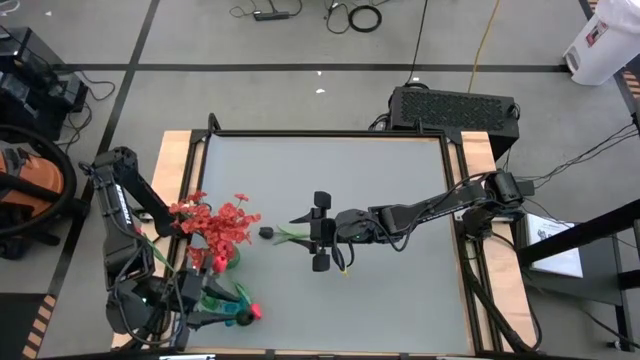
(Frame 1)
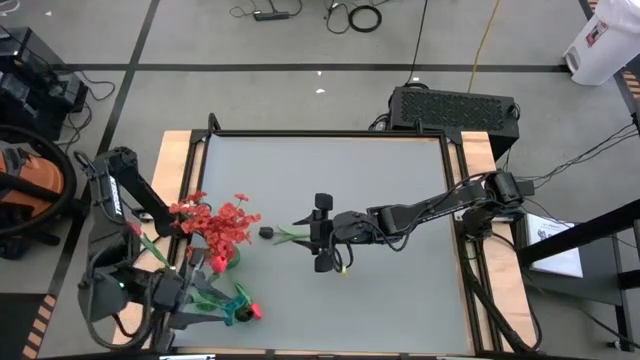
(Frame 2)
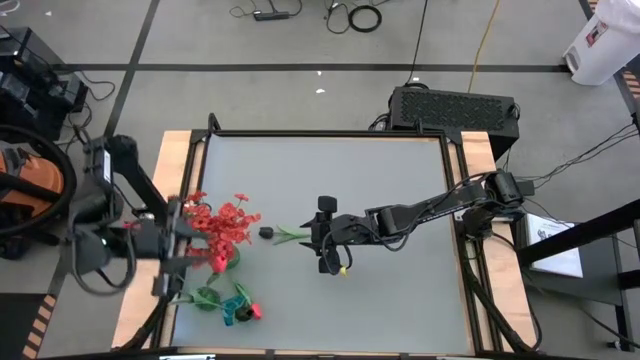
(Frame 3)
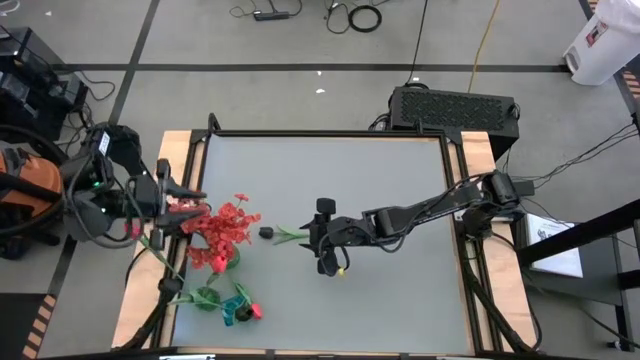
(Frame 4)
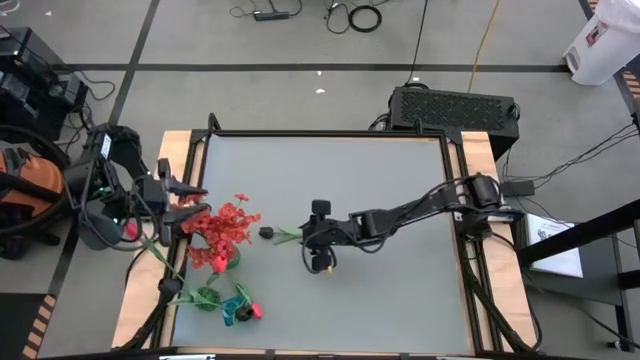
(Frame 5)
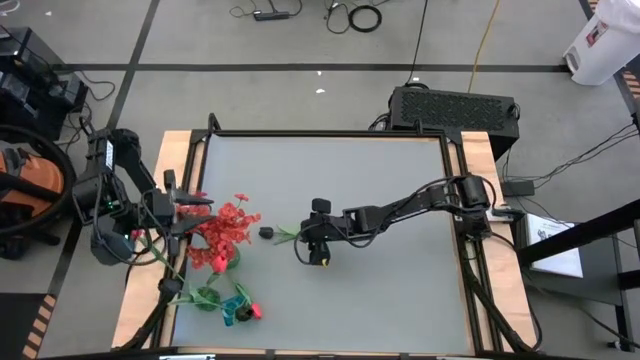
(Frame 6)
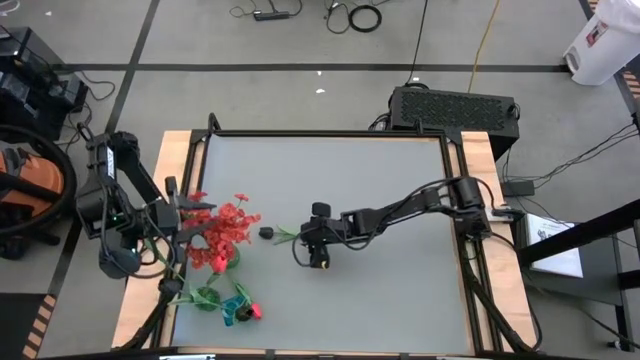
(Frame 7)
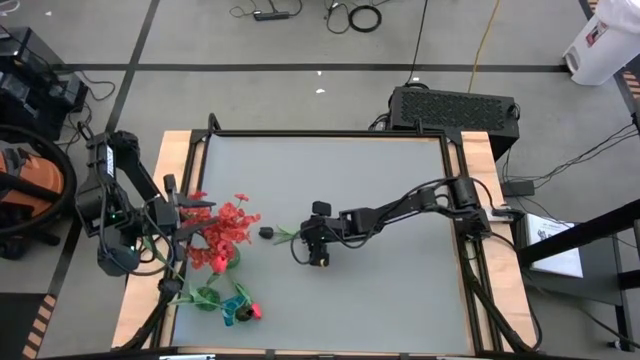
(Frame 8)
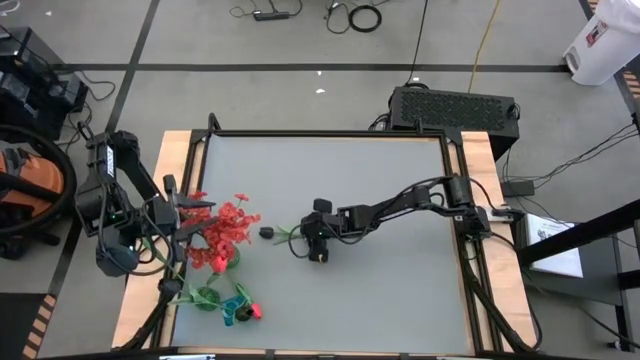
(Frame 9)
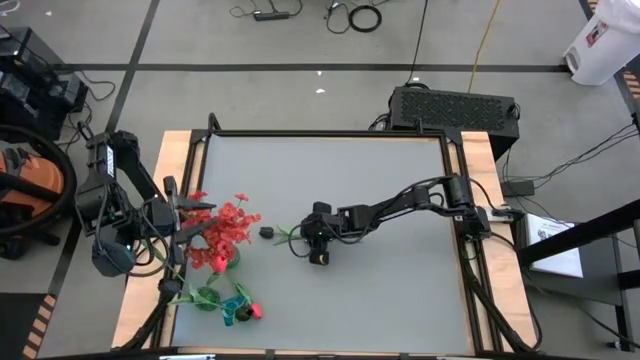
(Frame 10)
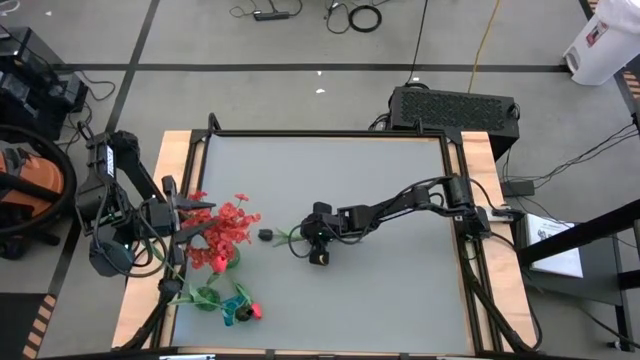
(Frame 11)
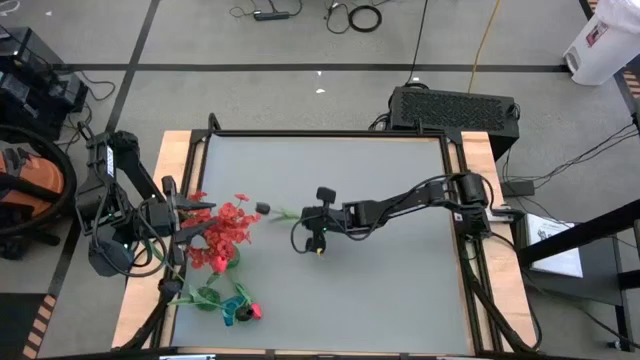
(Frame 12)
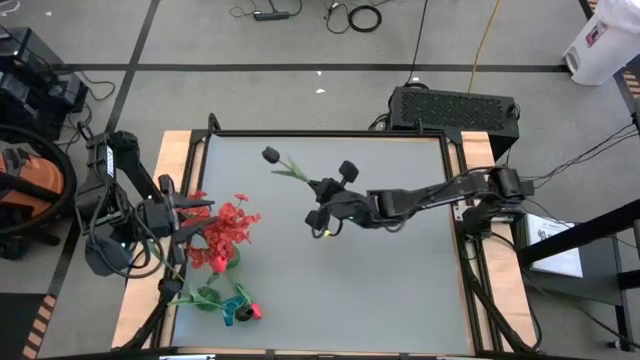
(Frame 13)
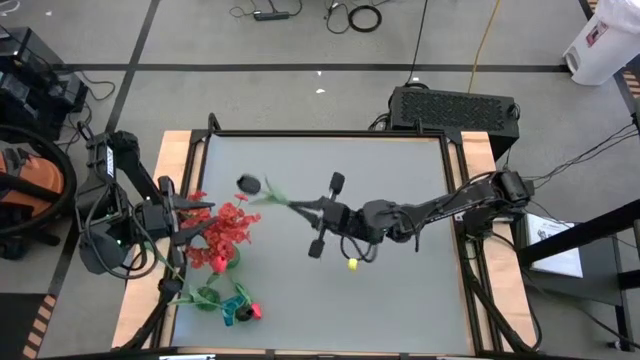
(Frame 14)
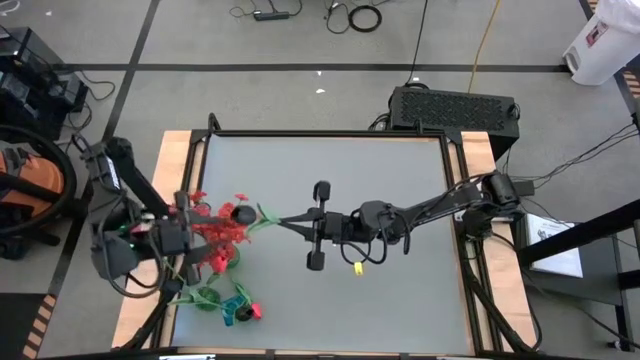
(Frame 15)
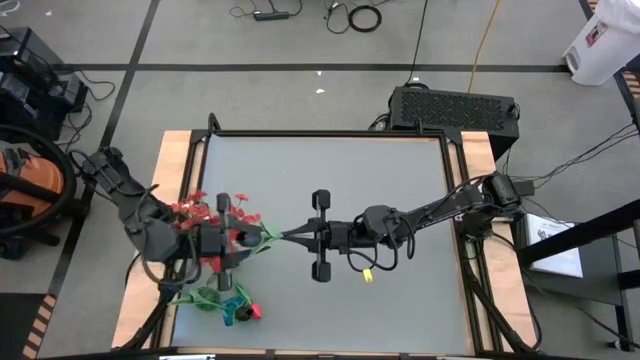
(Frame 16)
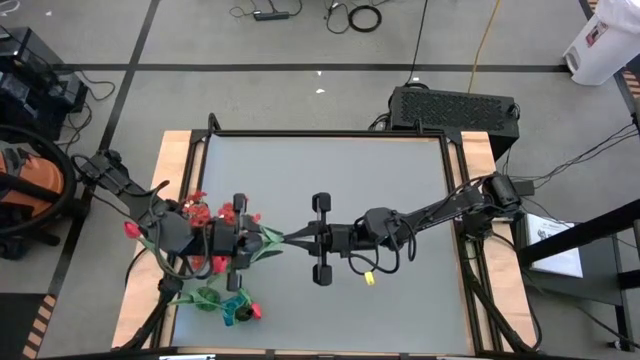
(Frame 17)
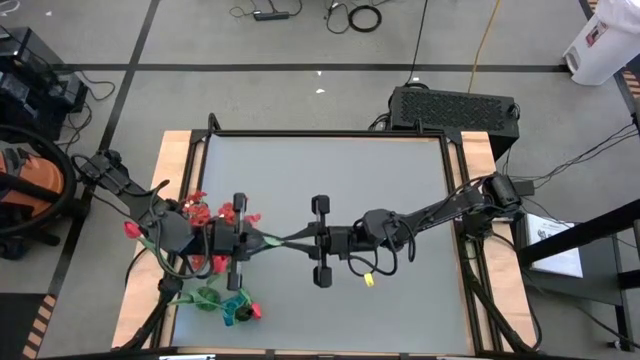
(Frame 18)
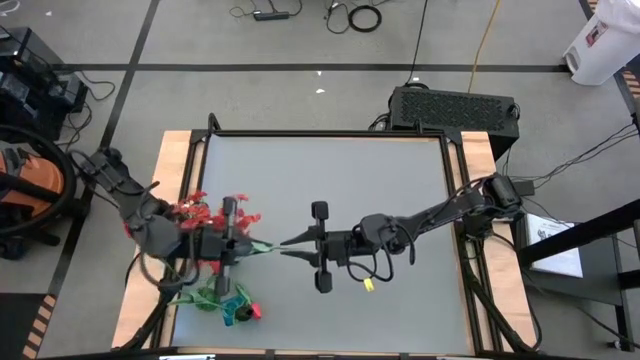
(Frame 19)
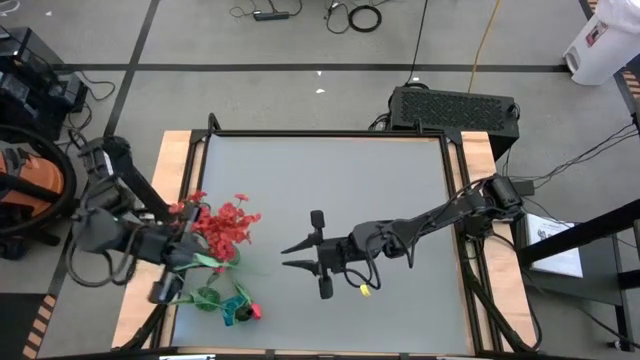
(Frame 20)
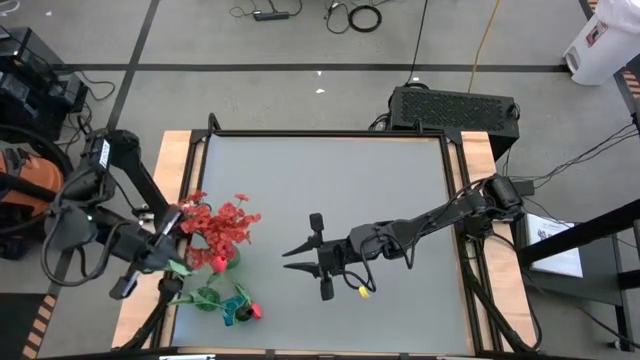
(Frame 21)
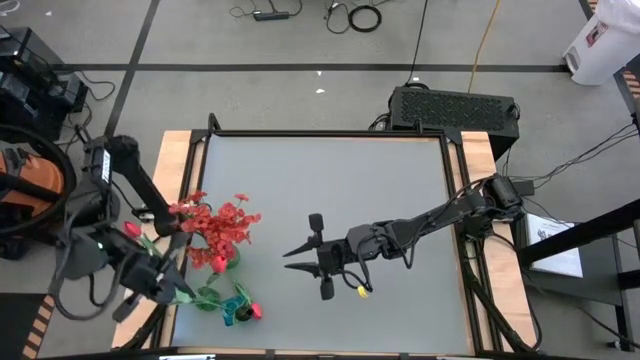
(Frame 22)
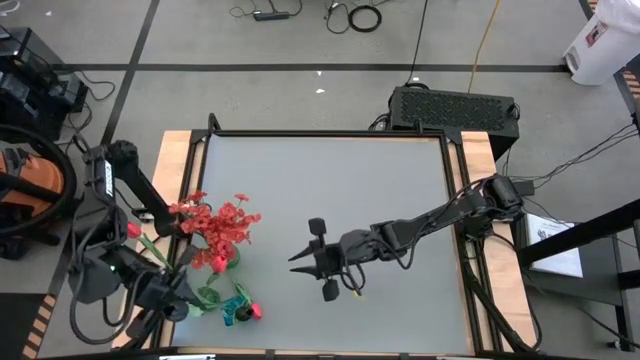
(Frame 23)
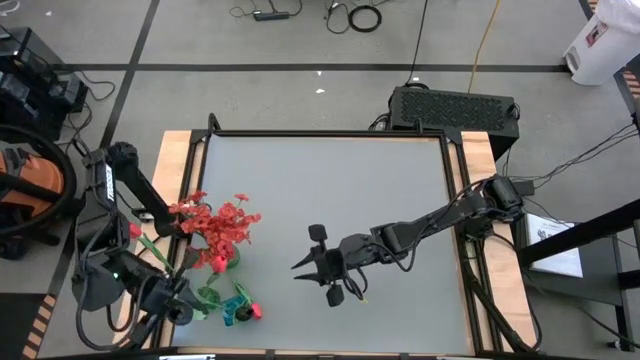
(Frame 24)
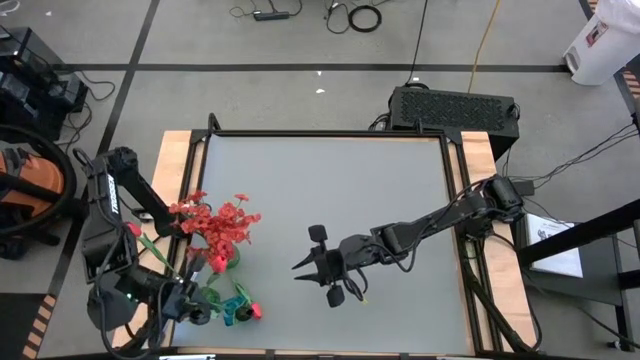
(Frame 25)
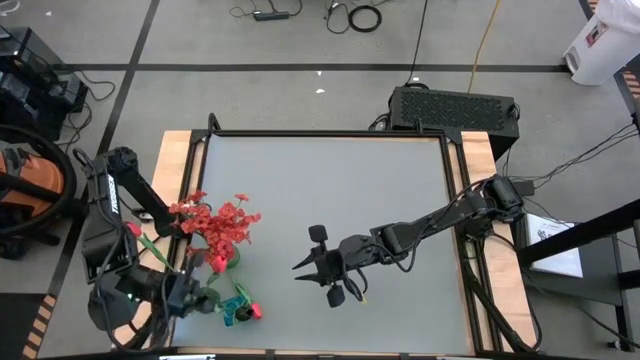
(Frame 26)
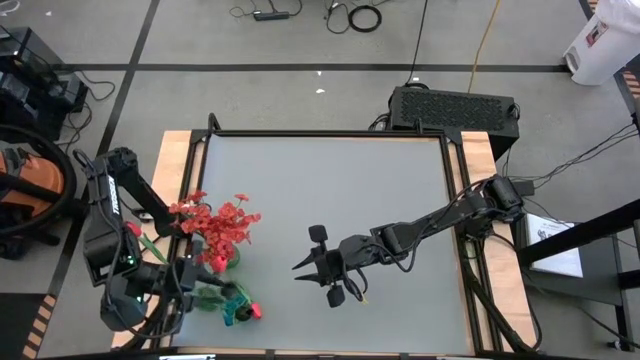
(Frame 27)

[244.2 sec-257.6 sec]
Task: Sort flowers into vase by color
Put the black flower into the blue vase

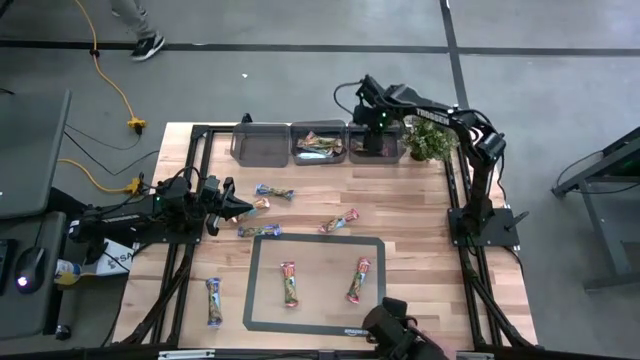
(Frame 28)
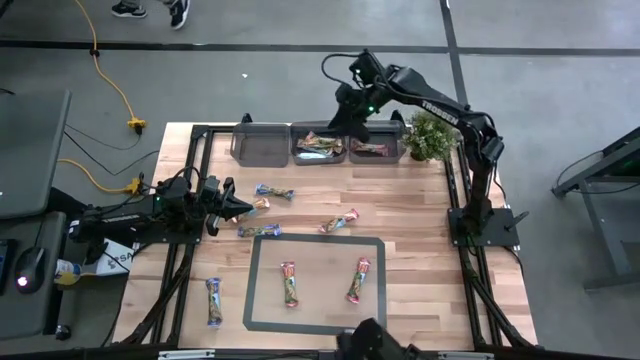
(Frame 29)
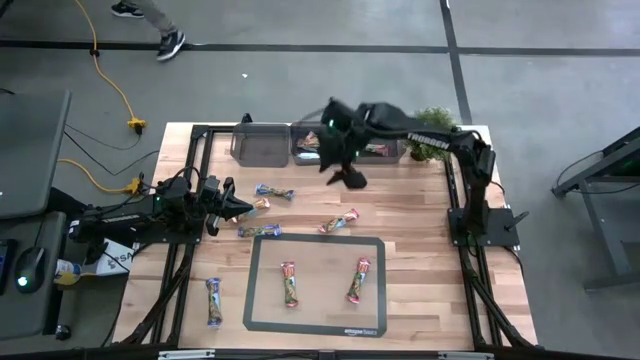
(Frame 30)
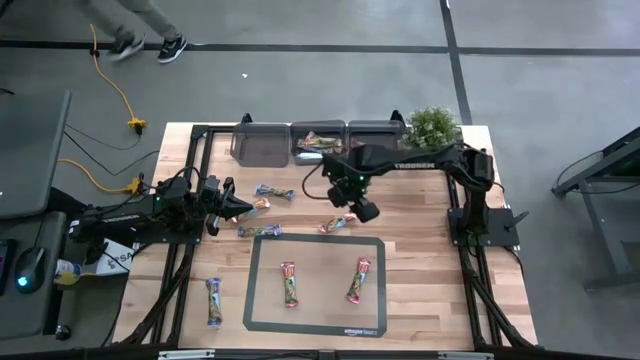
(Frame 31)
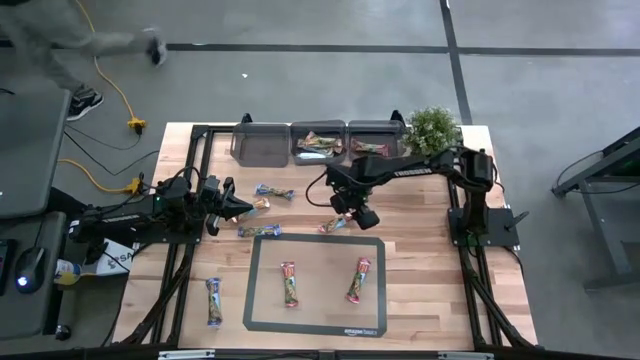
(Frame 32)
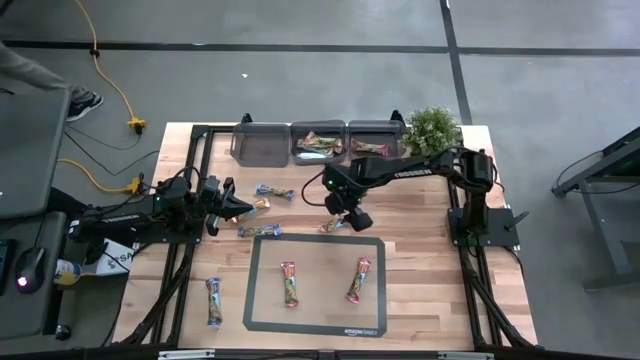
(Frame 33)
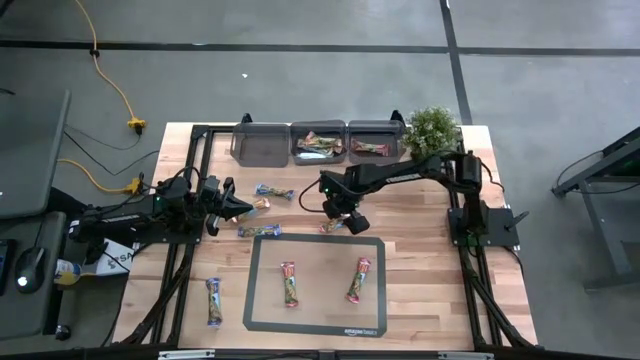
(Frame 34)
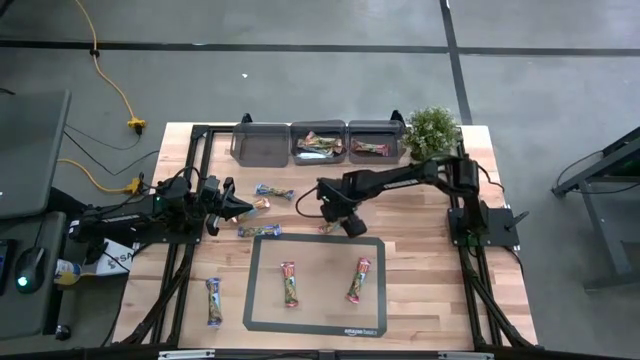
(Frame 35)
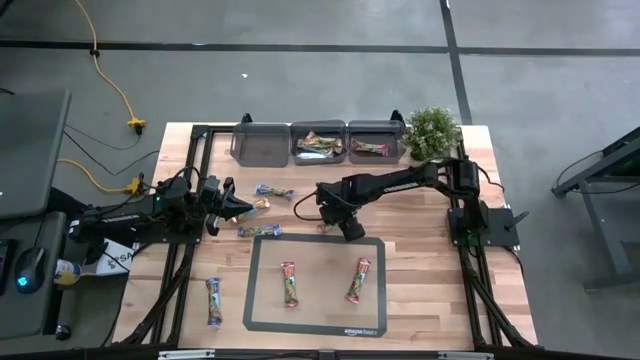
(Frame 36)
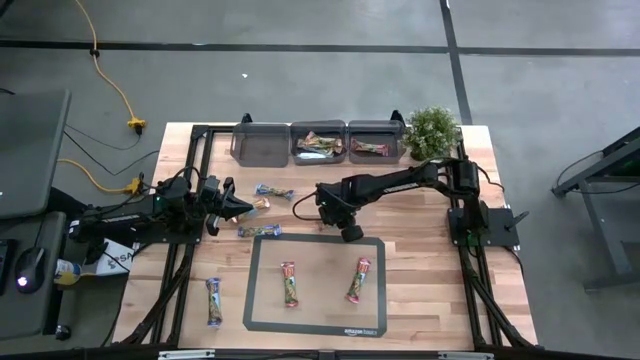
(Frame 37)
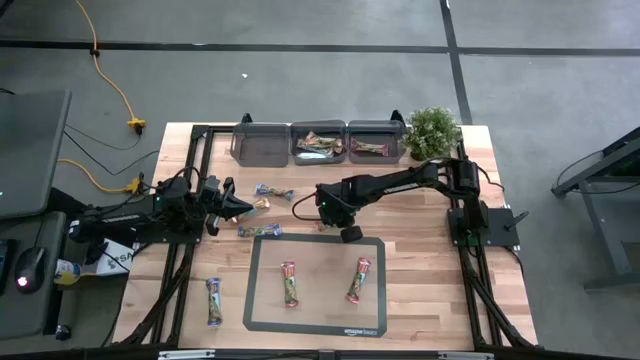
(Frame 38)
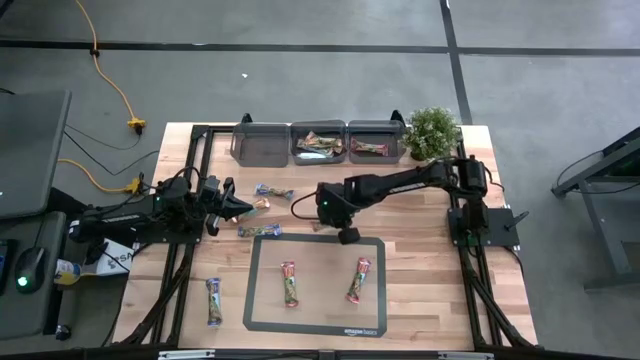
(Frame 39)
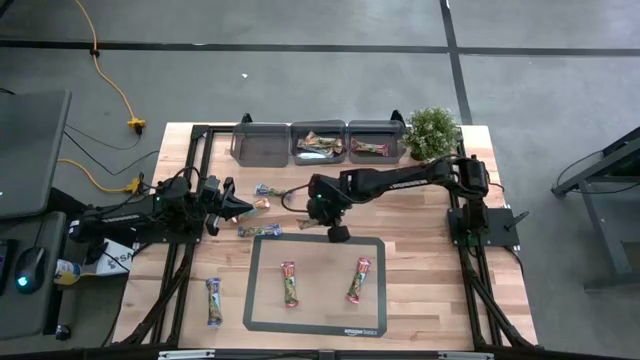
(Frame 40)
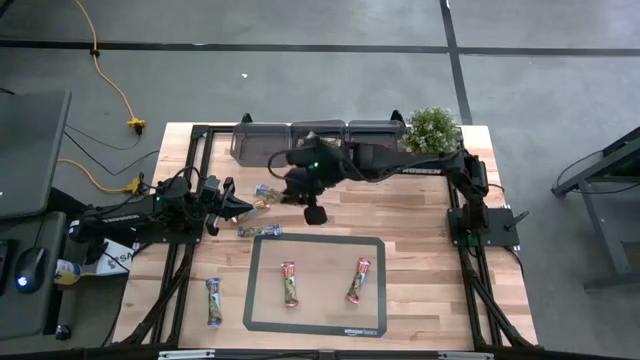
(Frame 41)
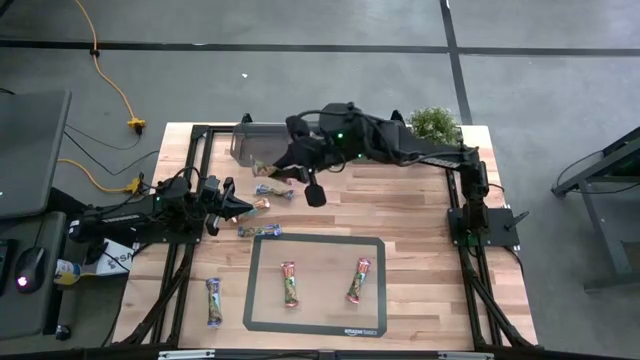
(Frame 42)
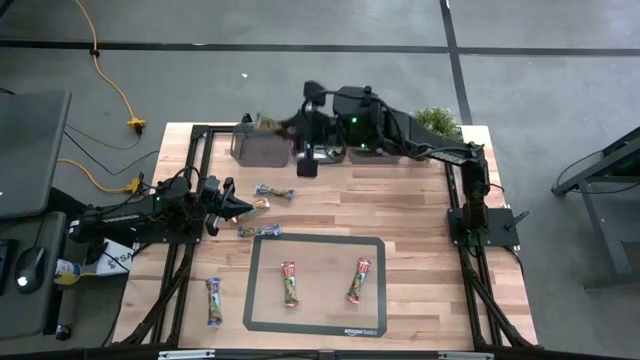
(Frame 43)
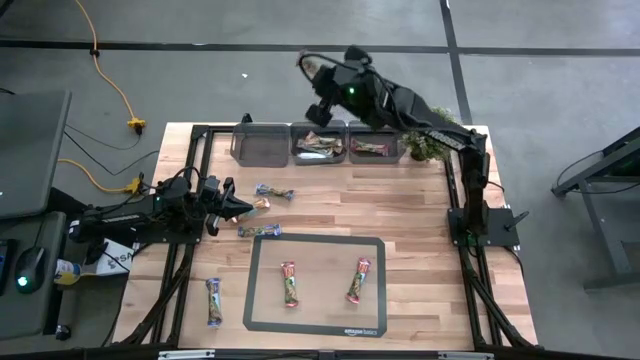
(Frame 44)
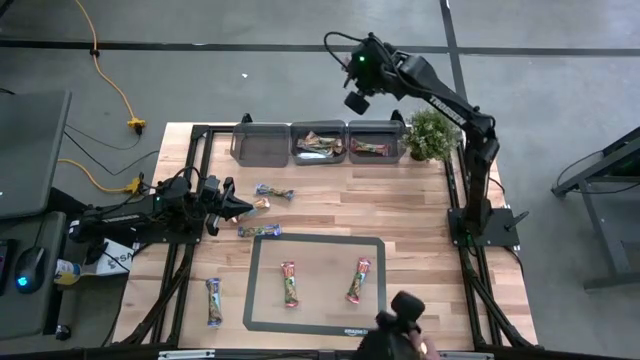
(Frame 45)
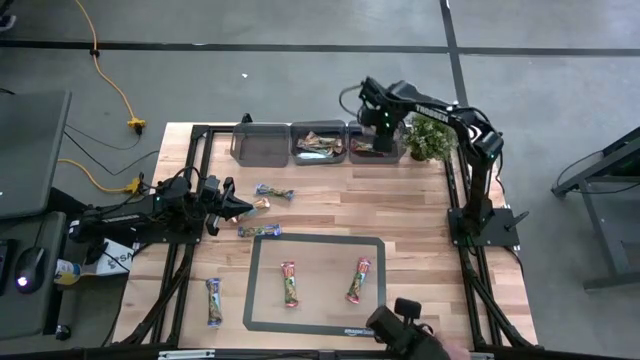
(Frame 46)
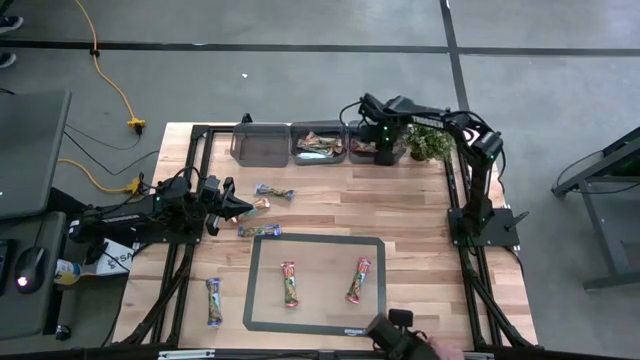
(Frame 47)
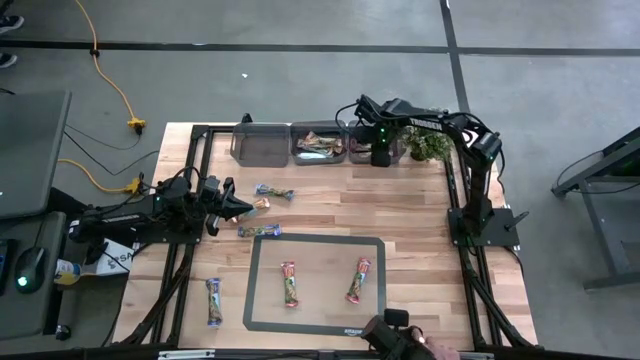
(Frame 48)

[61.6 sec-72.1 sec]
Task: Pick and place Granola Bars by type
Put the red granola bar into the right black bin
